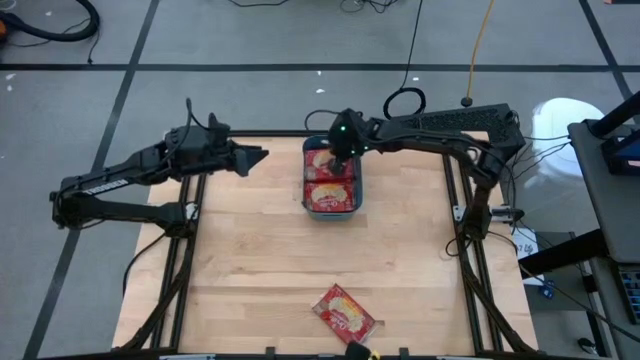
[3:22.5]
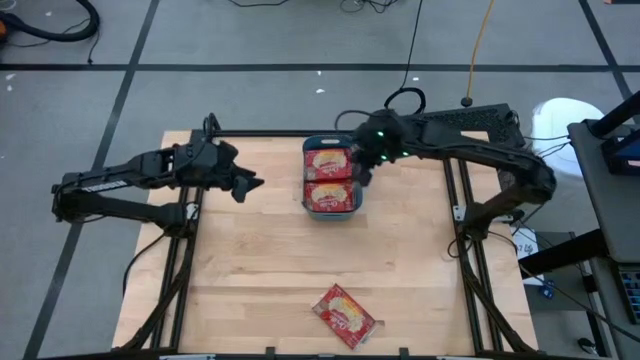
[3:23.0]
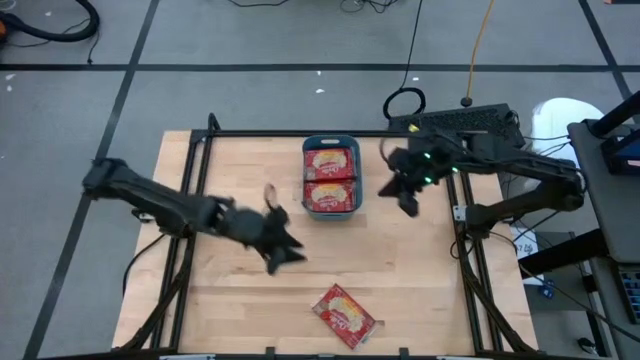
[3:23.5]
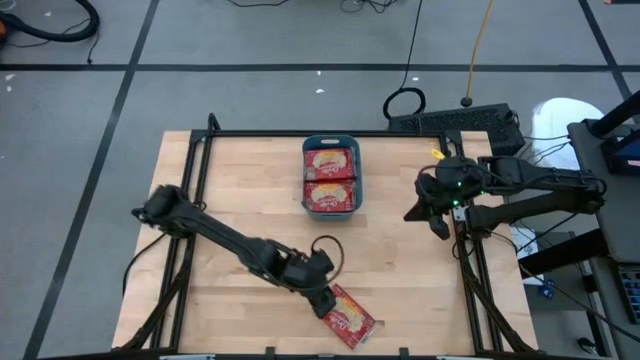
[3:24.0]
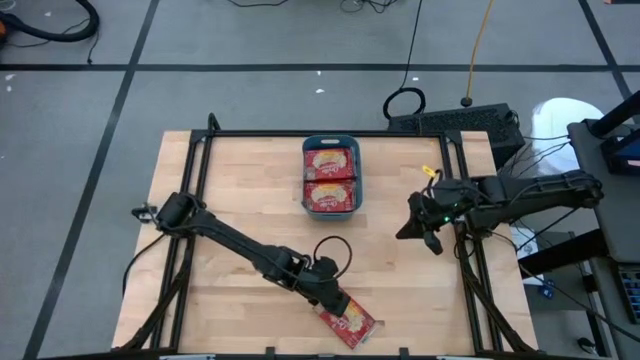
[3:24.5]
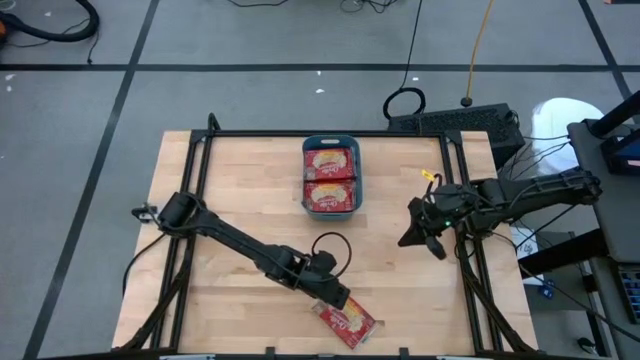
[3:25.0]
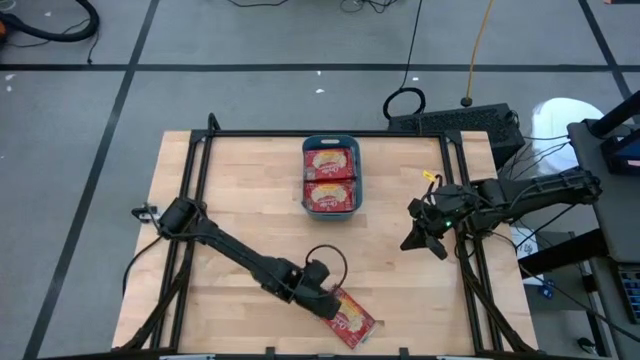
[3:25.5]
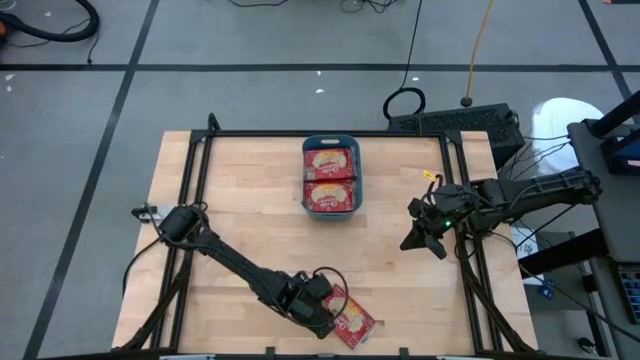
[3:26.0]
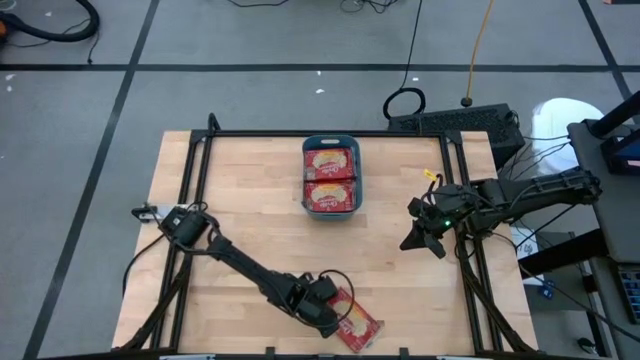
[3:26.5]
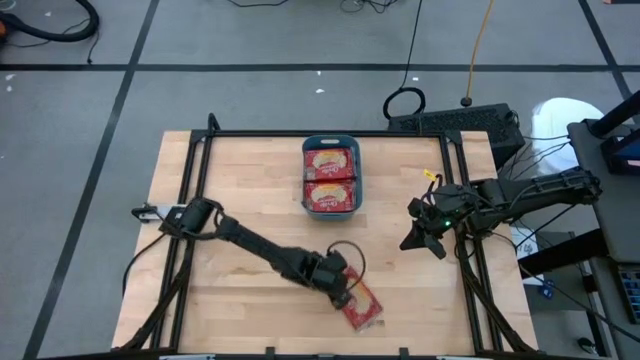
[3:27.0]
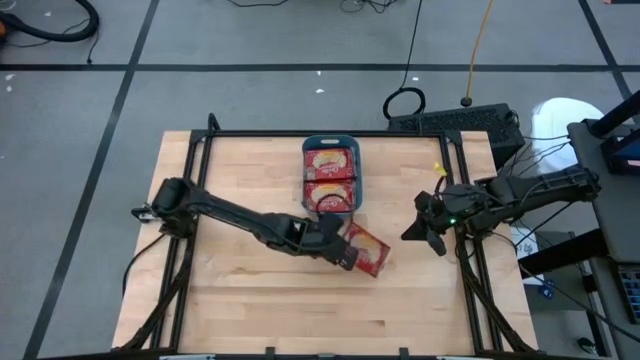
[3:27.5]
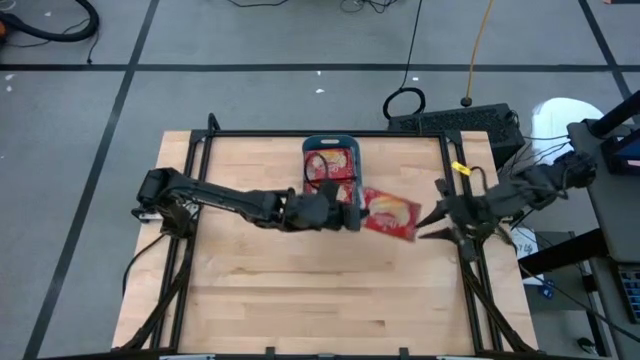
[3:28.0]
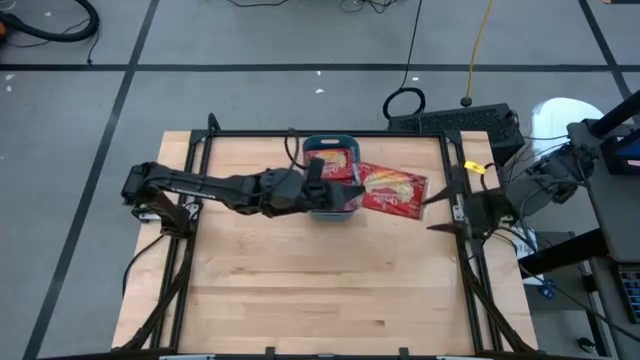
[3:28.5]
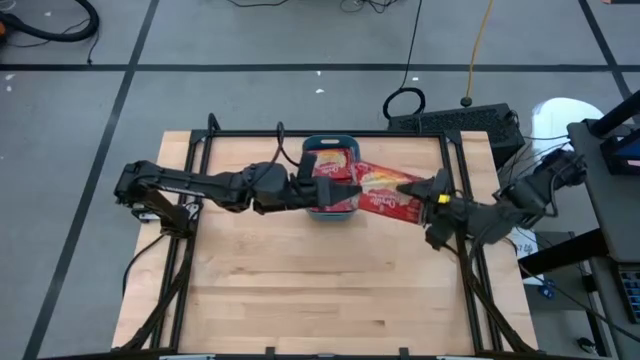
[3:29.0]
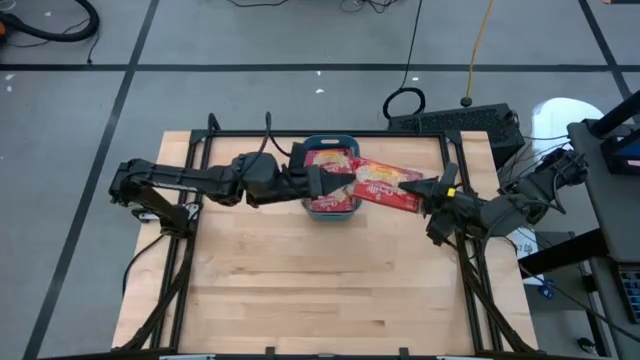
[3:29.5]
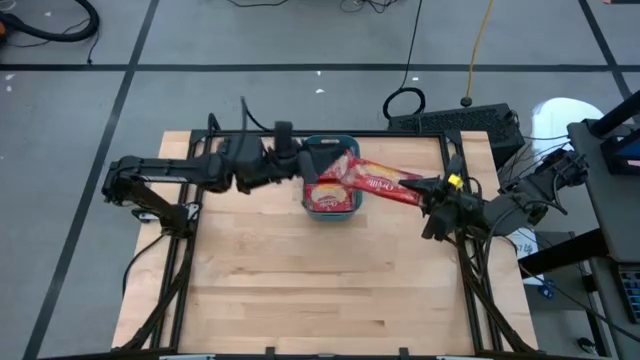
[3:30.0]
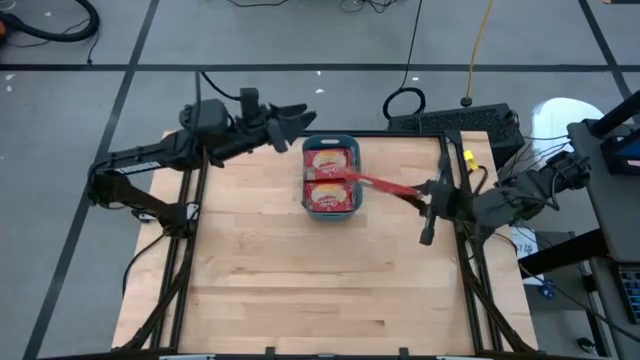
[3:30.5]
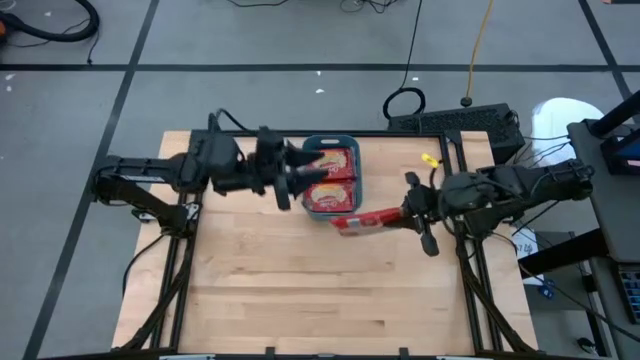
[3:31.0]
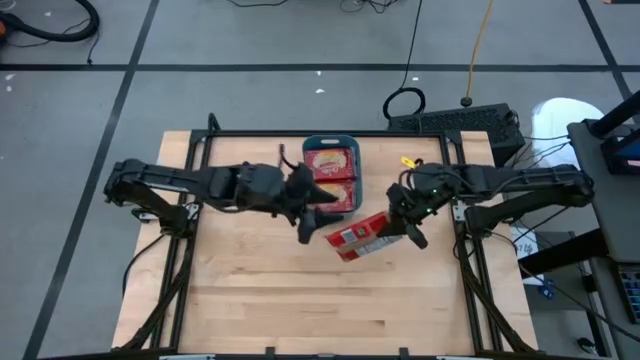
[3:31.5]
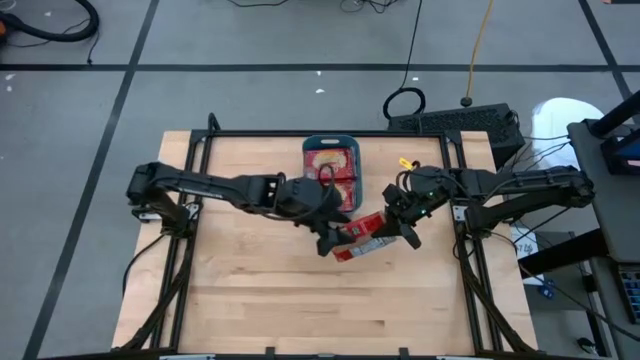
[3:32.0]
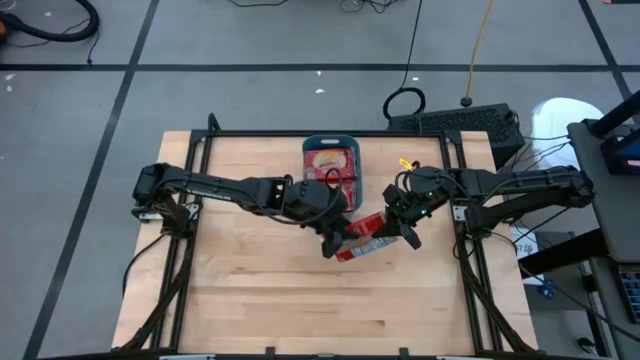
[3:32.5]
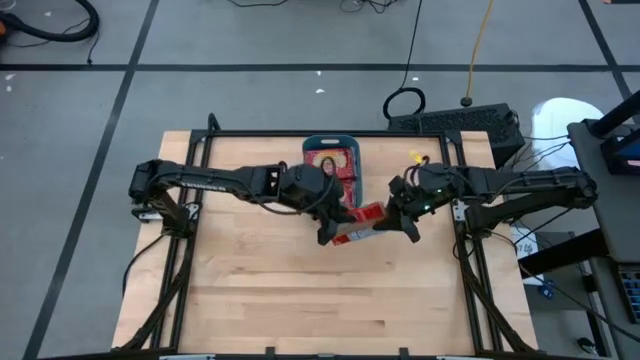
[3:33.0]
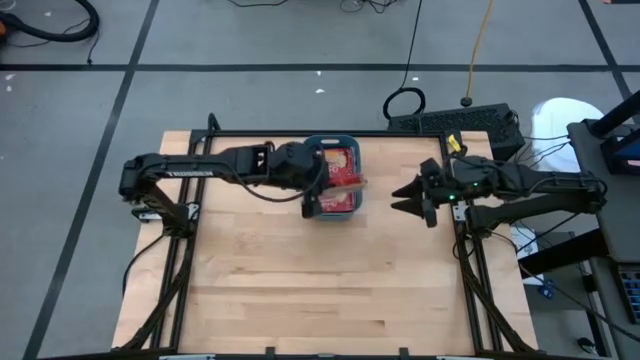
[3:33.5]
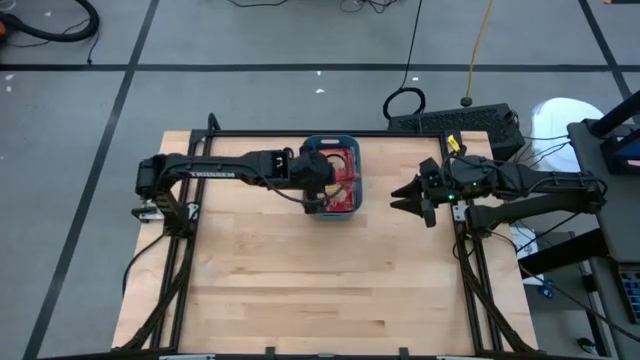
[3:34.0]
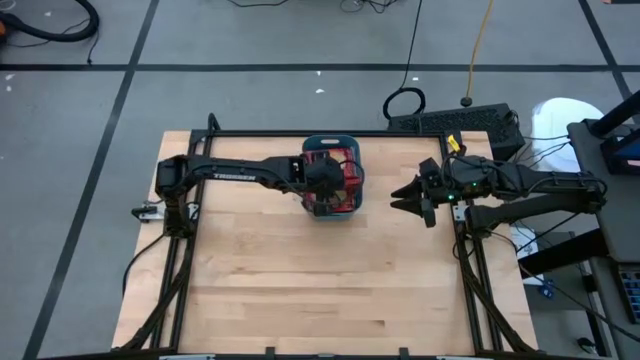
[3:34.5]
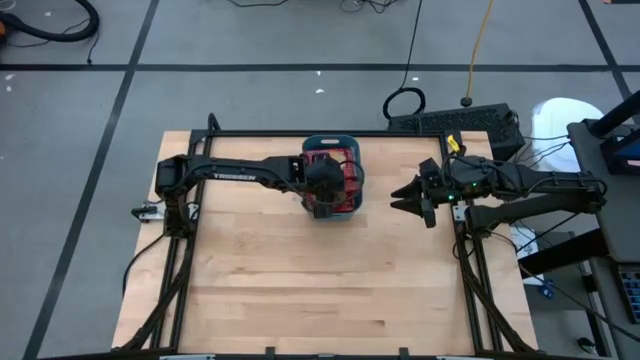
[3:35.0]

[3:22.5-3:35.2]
Task: Sort popcorn bags into baskets
Put the red popcorn bag into the blue bin

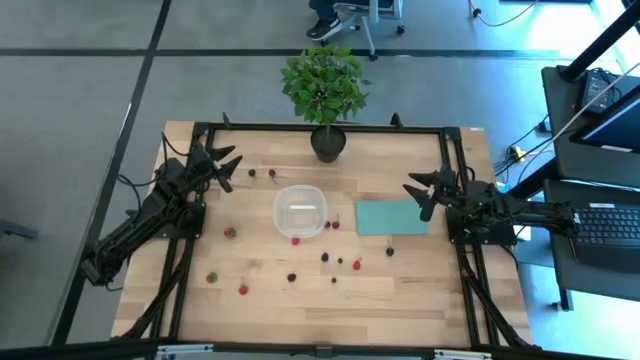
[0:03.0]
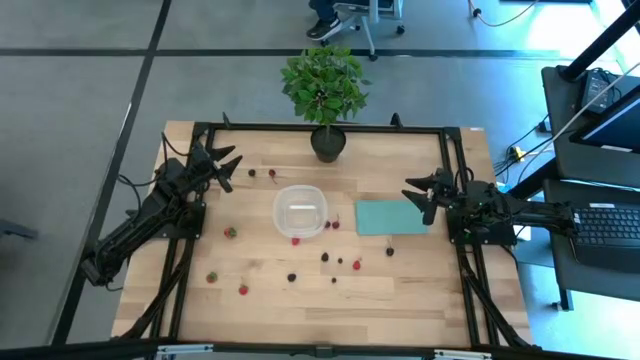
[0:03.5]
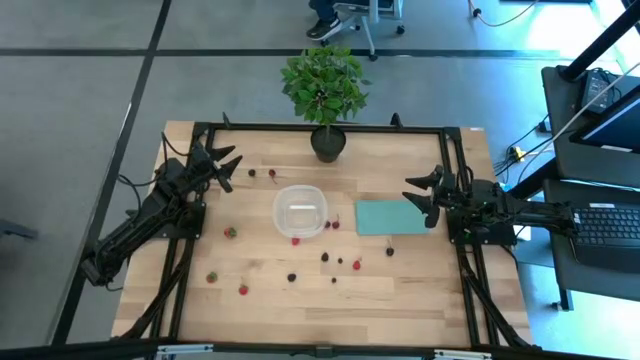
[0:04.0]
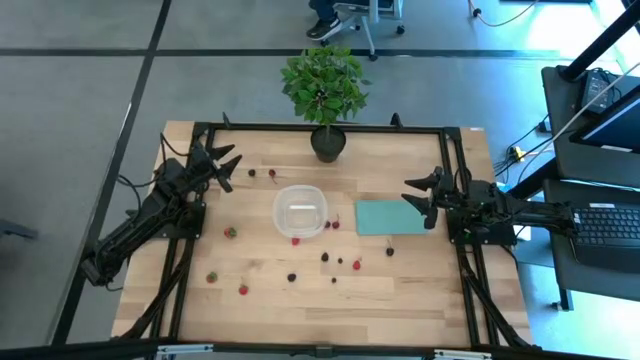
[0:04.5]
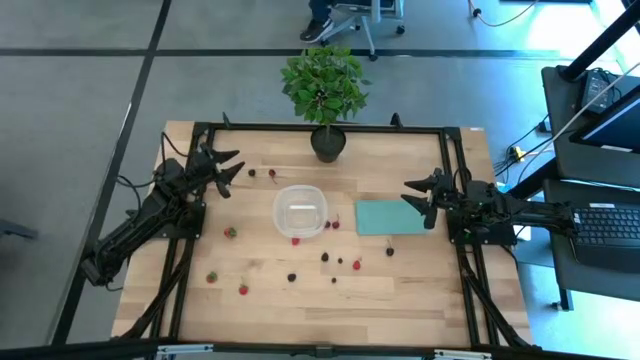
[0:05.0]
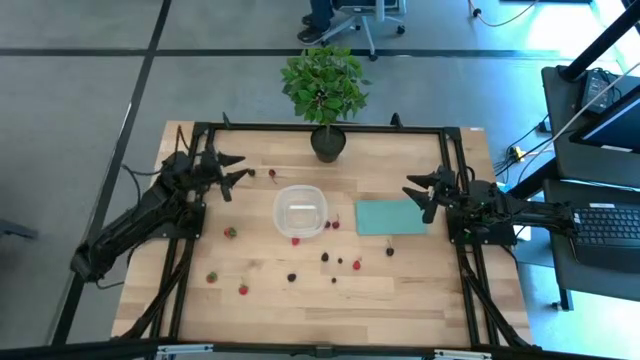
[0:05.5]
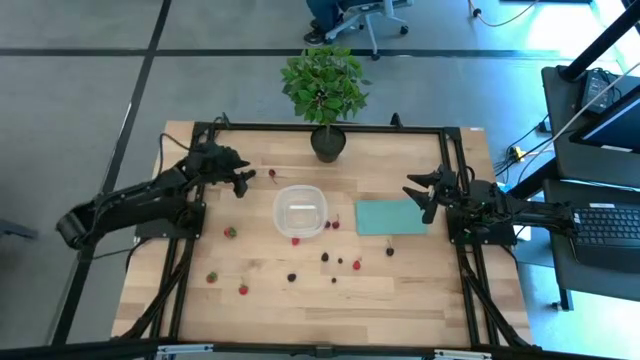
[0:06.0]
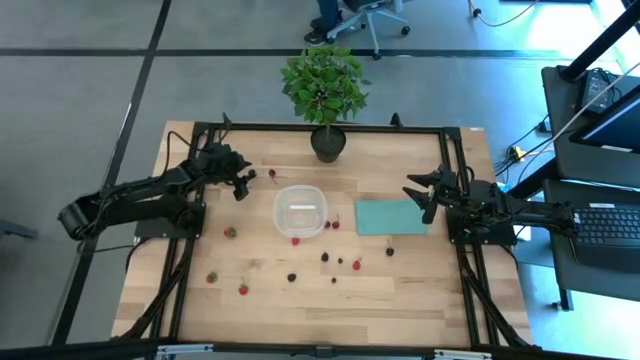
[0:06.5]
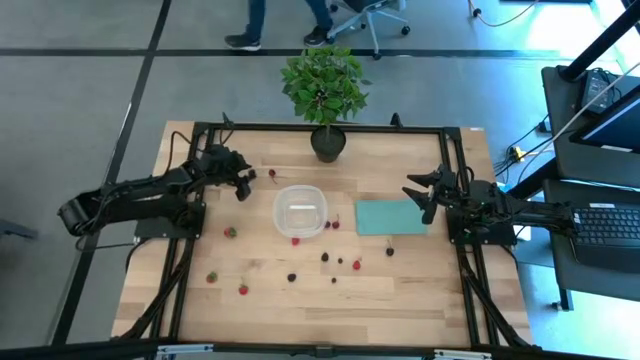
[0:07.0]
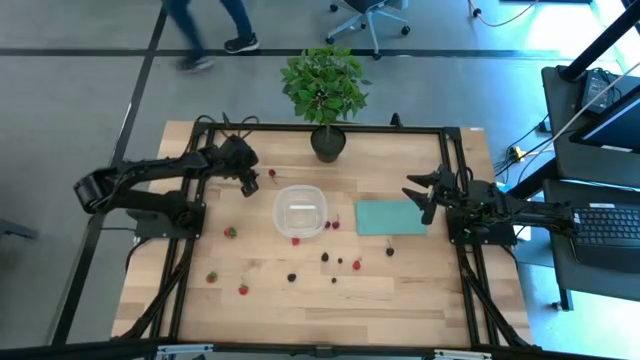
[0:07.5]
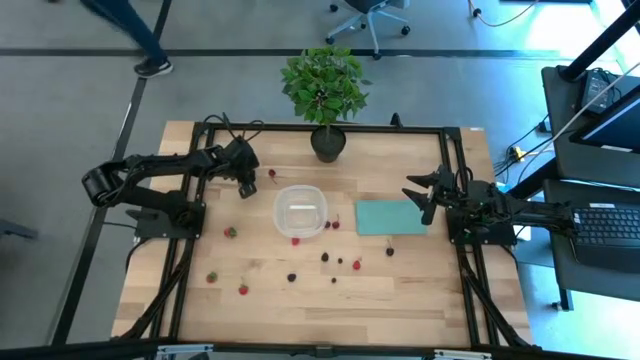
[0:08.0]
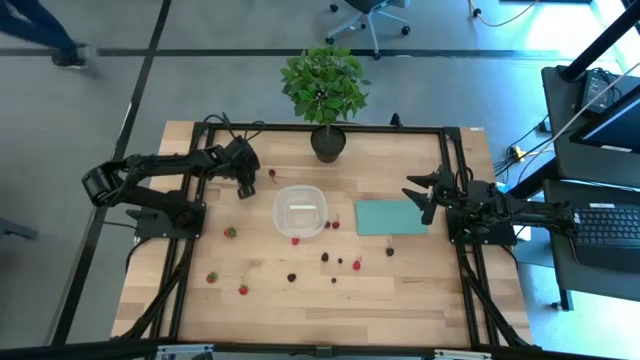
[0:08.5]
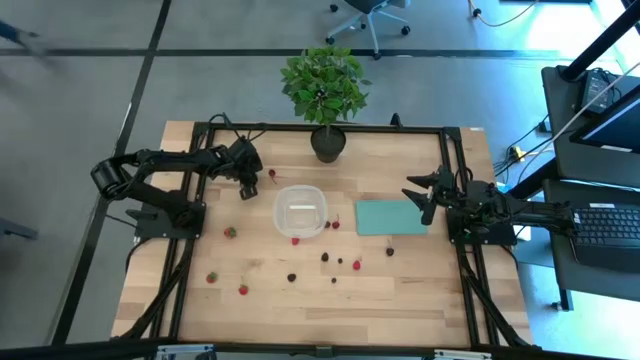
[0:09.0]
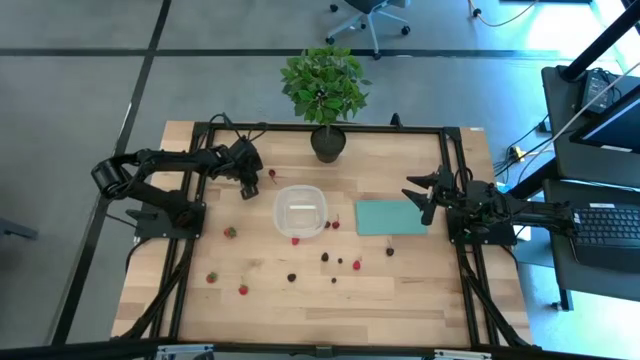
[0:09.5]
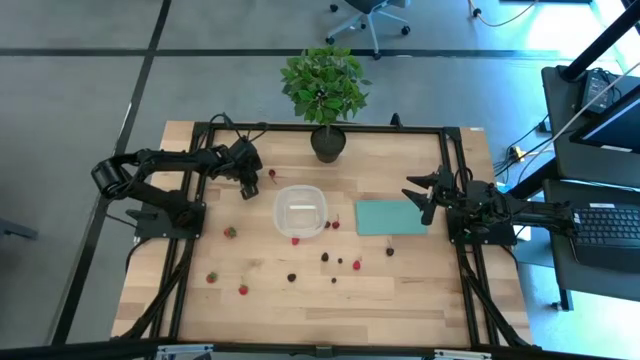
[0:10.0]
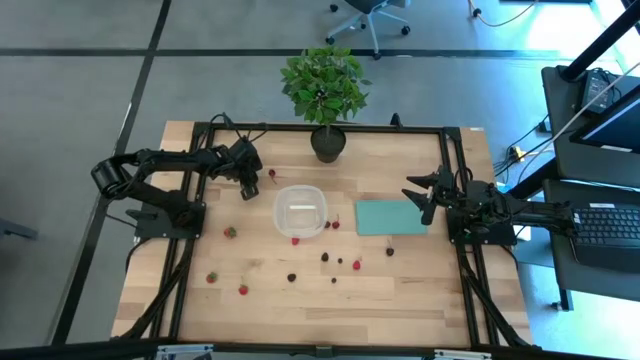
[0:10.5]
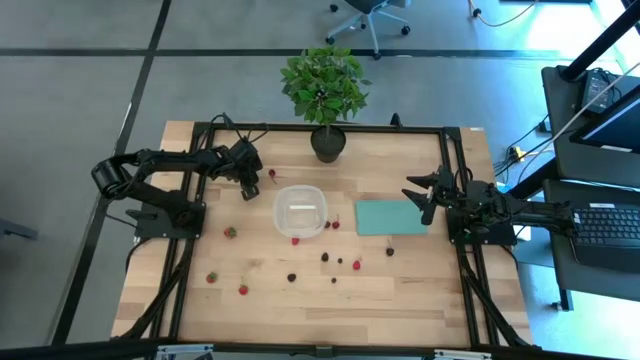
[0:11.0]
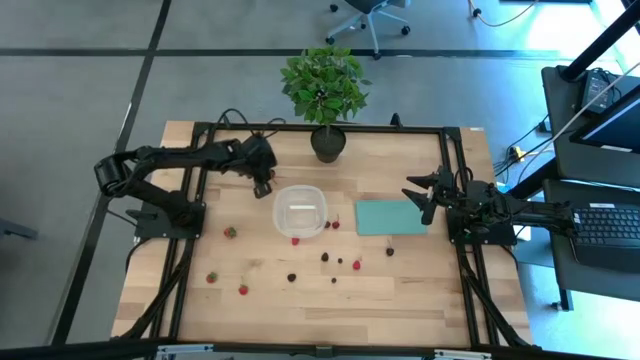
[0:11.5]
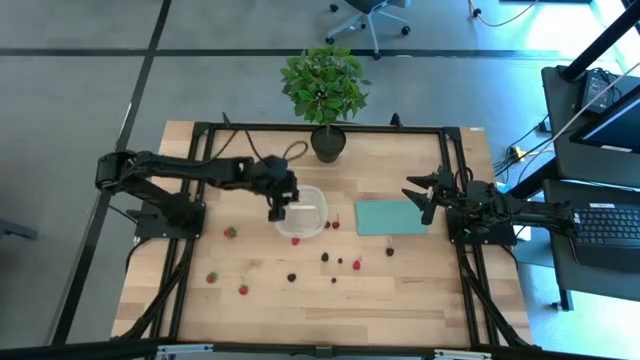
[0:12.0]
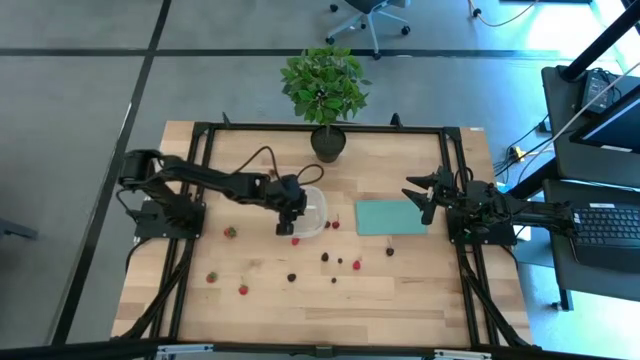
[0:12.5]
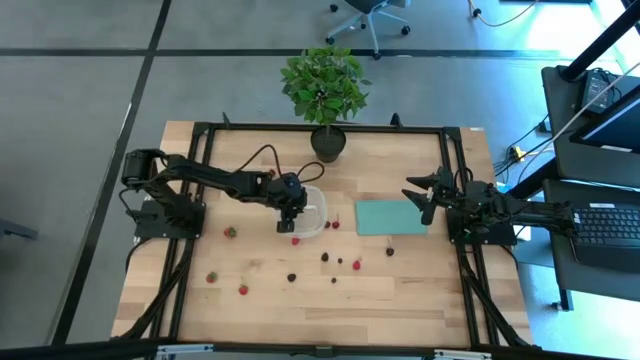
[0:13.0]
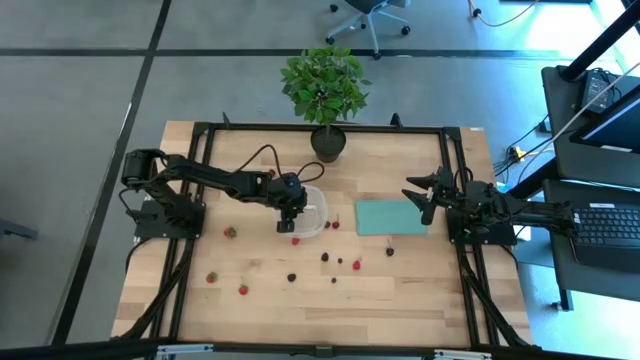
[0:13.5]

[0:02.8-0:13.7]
Task: Pick and placing Produce into tupperware
Put the top black cherry into the container
